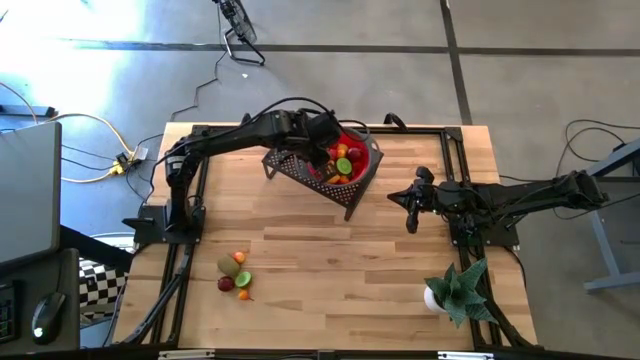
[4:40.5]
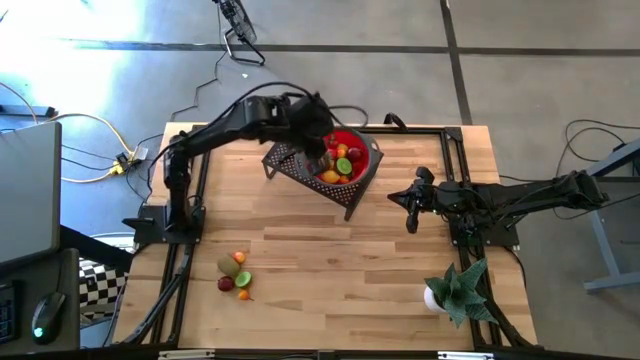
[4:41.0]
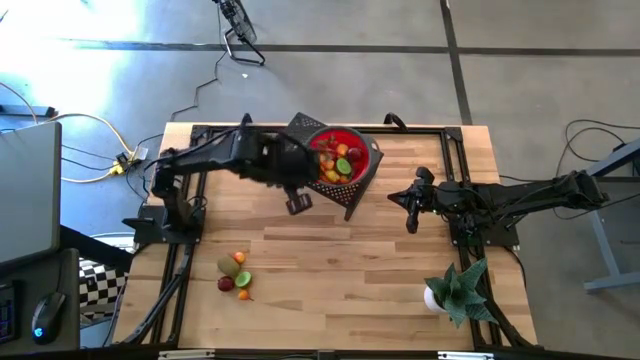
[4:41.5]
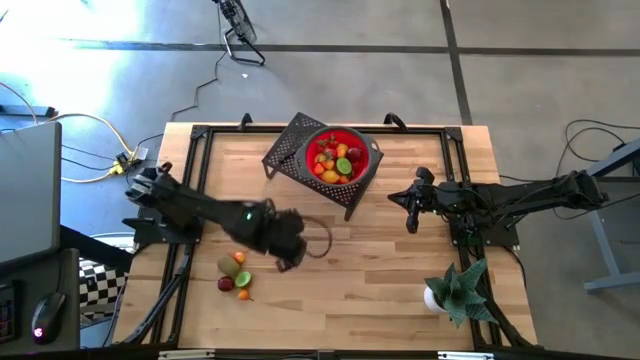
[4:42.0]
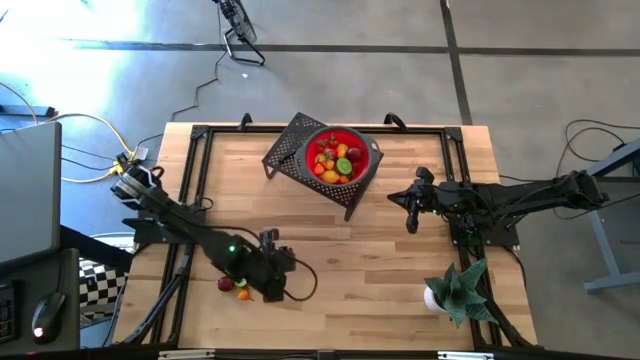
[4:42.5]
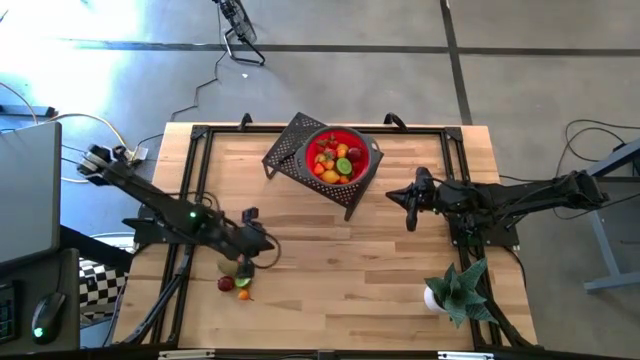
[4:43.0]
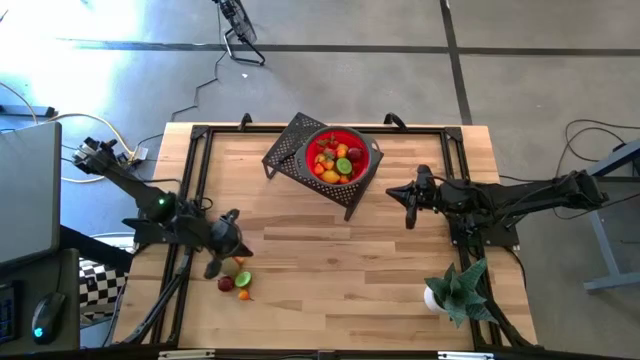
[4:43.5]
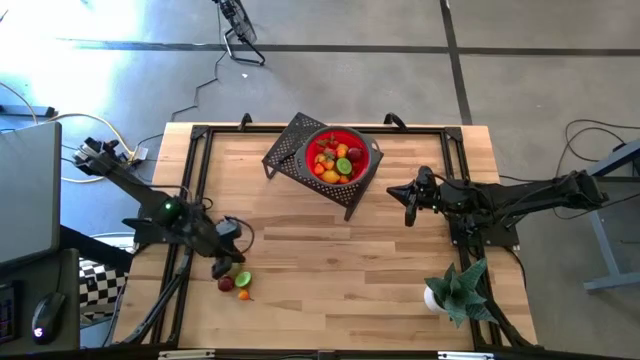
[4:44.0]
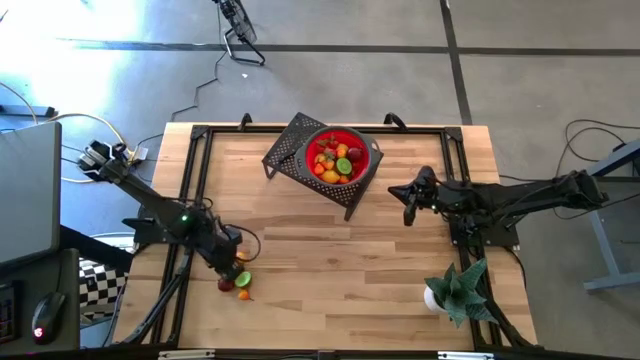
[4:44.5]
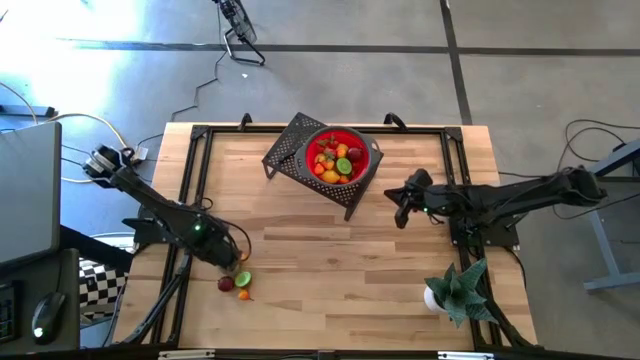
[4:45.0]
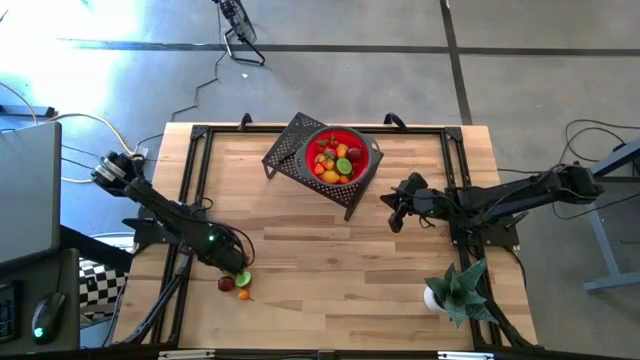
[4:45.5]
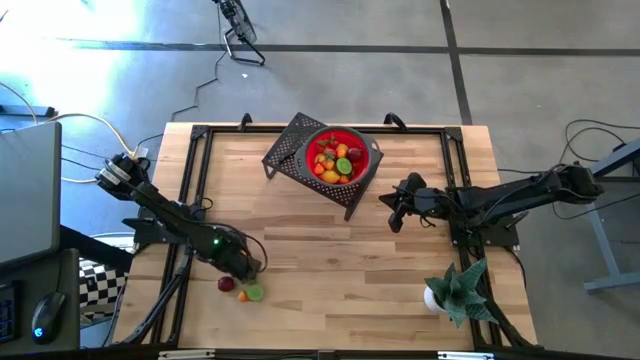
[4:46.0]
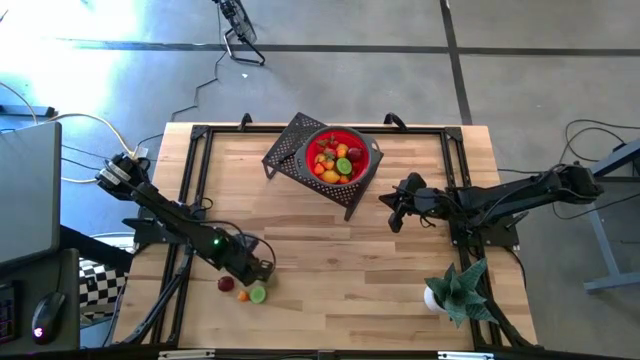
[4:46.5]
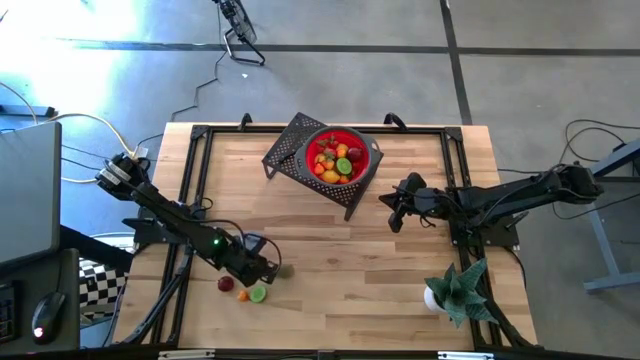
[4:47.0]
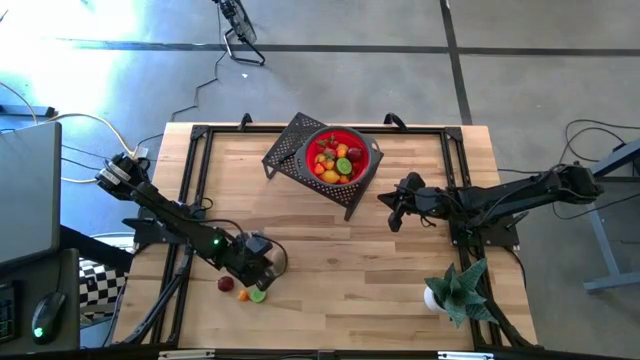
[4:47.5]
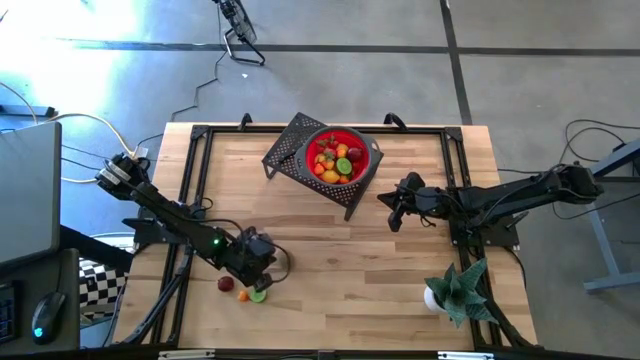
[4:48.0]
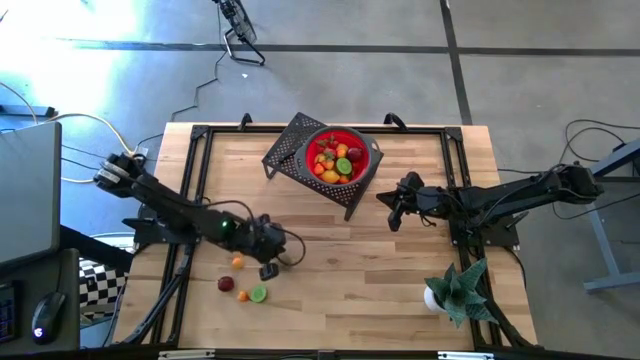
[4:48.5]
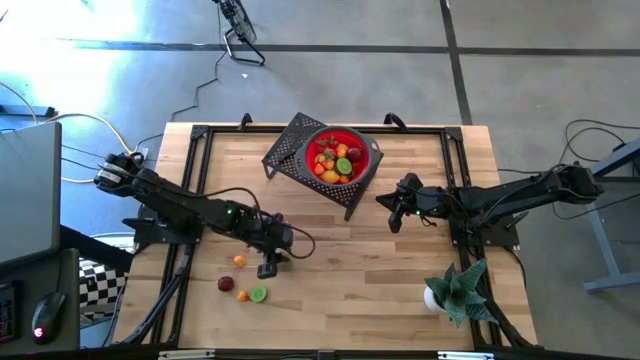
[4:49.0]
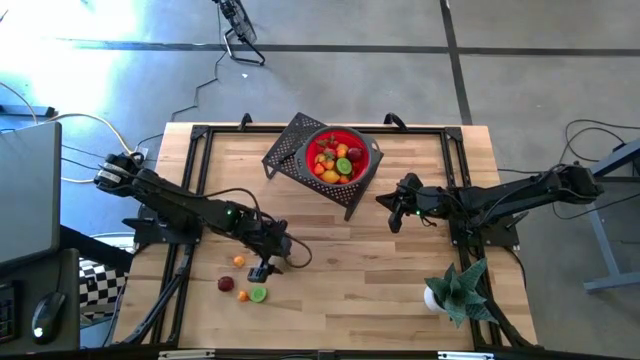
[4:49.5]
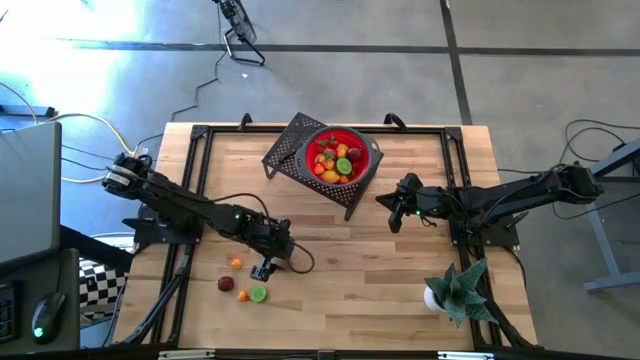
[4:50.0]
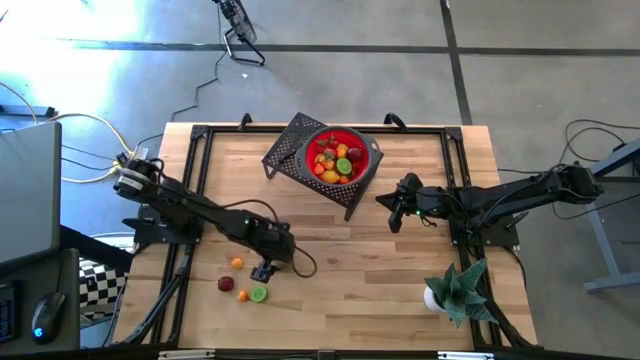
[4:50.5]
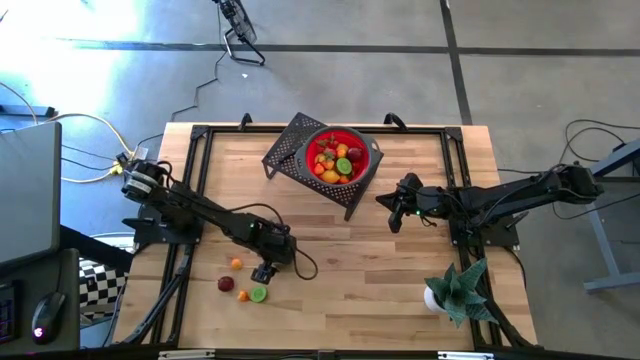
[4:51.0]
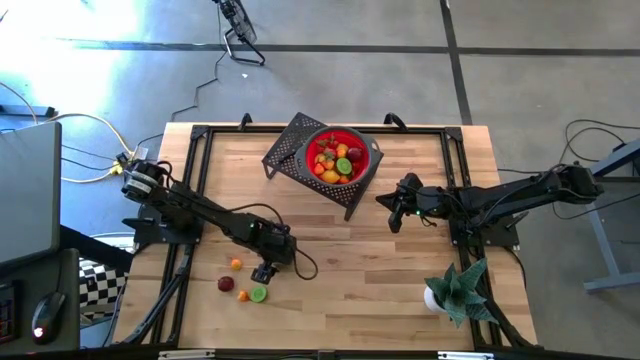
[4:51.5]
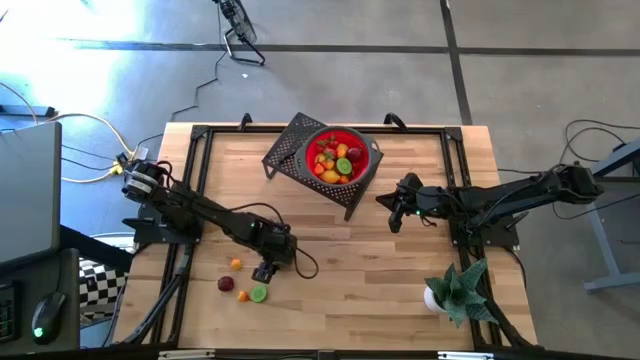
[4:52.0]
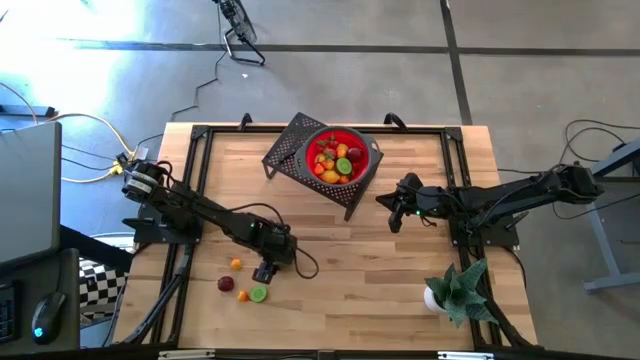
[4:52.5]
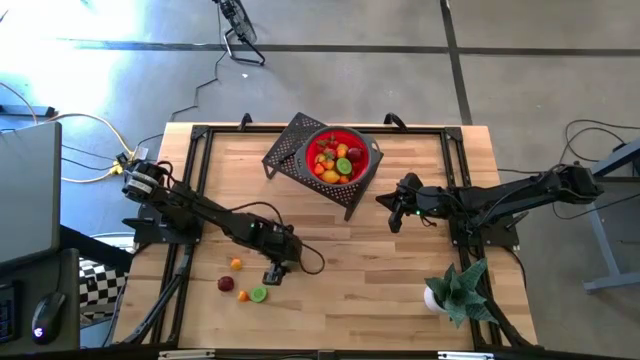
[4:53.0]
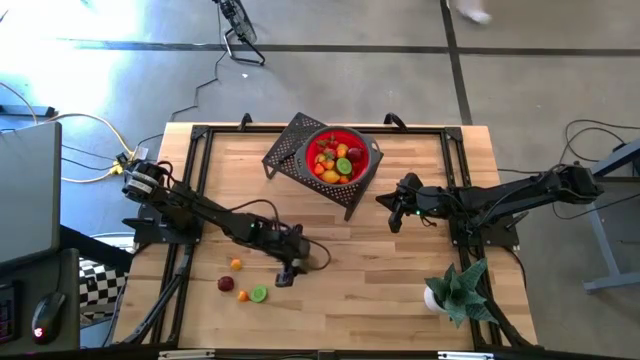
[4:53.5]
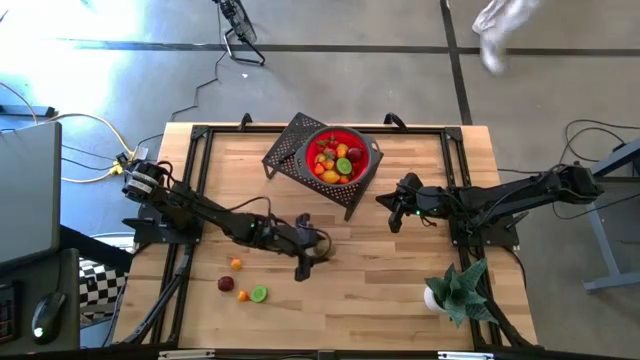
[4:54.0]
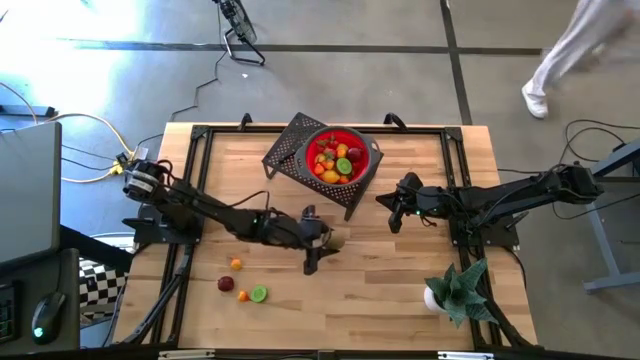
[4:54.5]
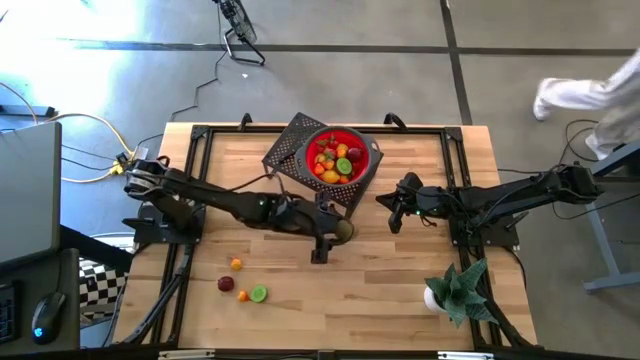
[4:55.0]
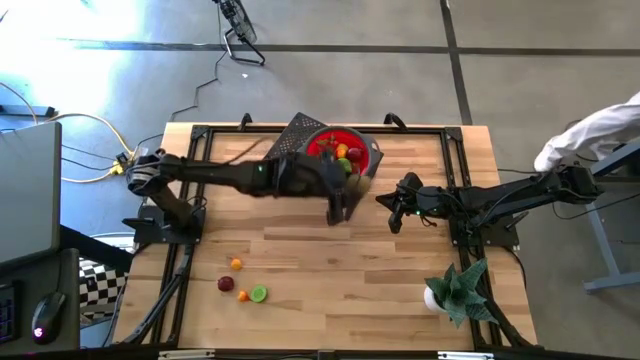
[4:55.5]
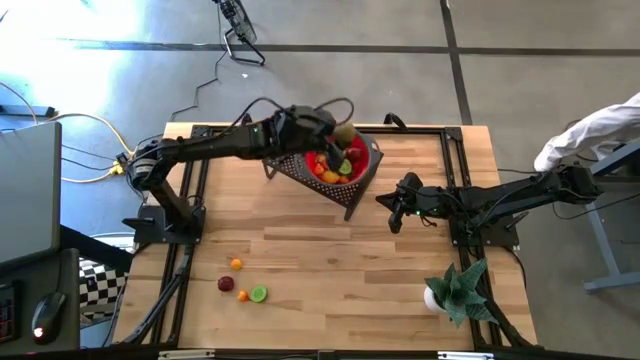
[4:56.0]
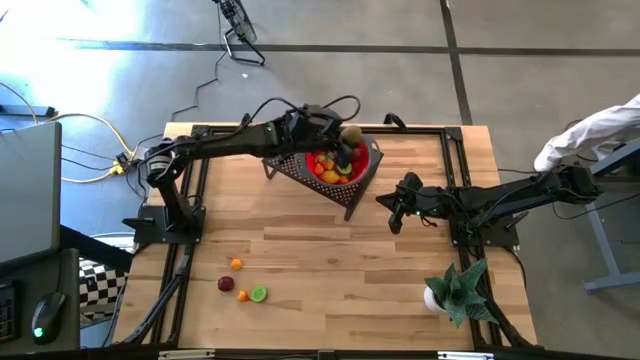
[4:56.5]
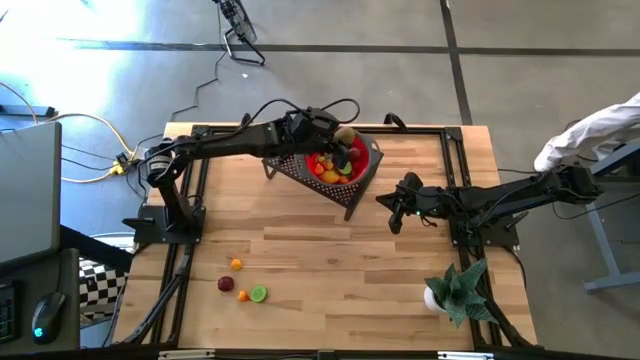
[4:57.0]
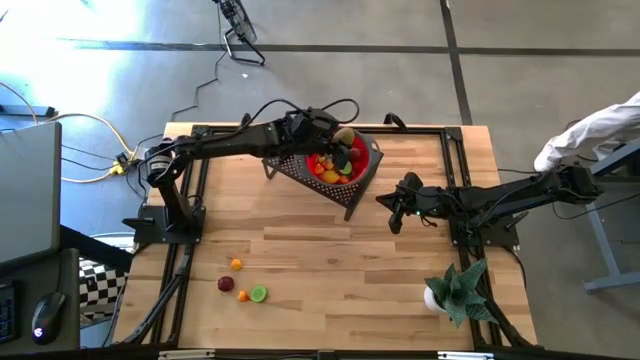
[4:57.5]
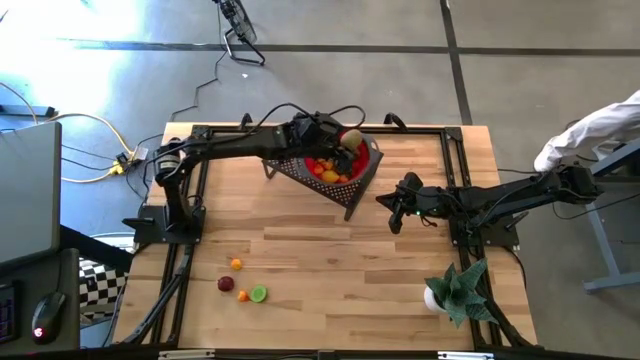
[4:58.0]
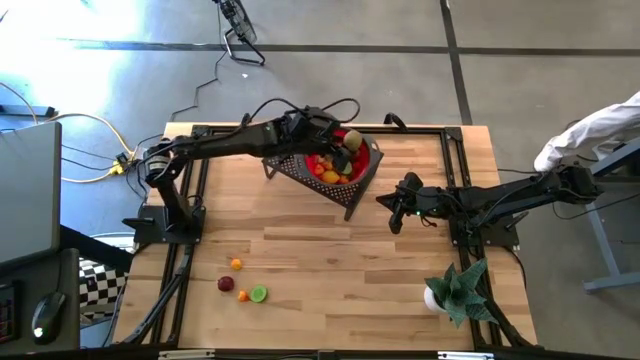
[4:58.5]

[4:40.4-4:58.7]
Task: Pick & Place Fruit
Put the kiwi into the strainer bowl on the shelf

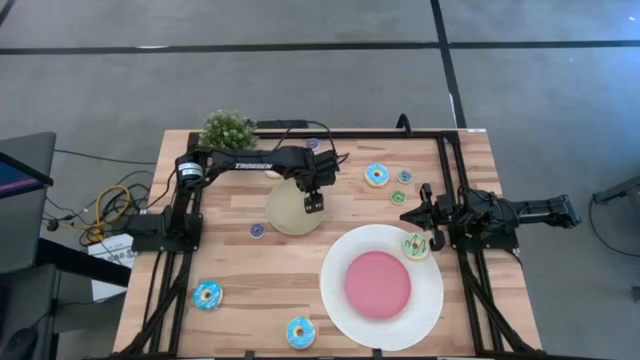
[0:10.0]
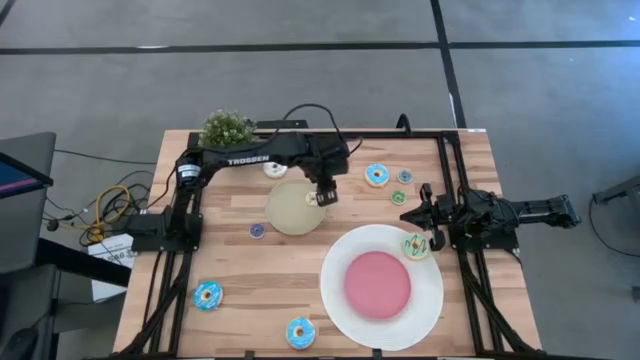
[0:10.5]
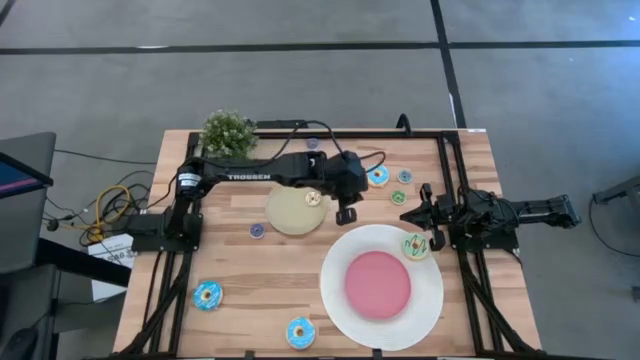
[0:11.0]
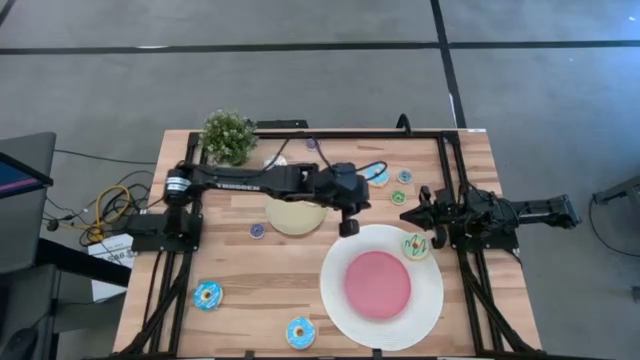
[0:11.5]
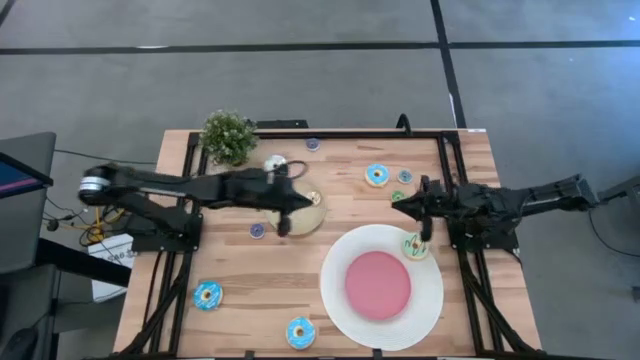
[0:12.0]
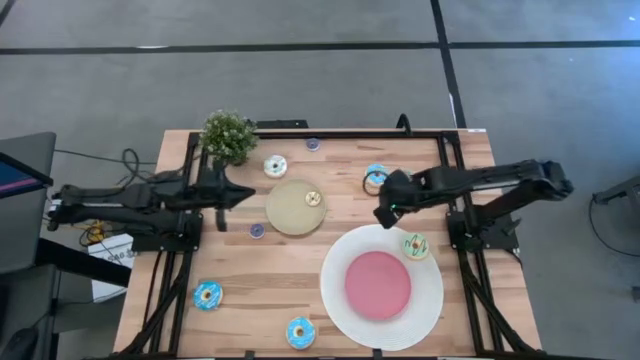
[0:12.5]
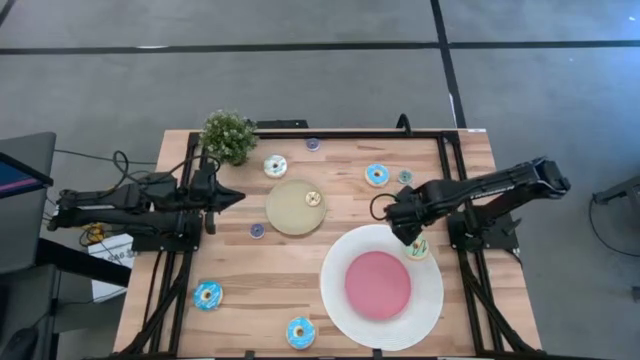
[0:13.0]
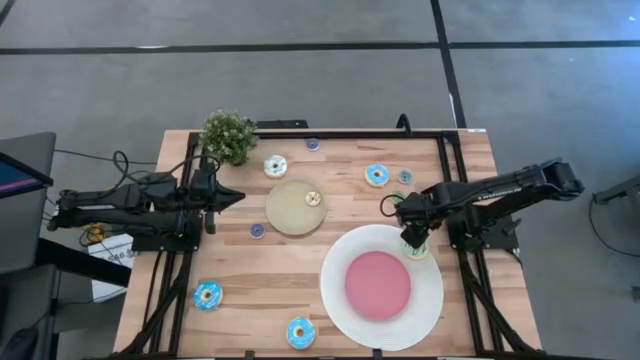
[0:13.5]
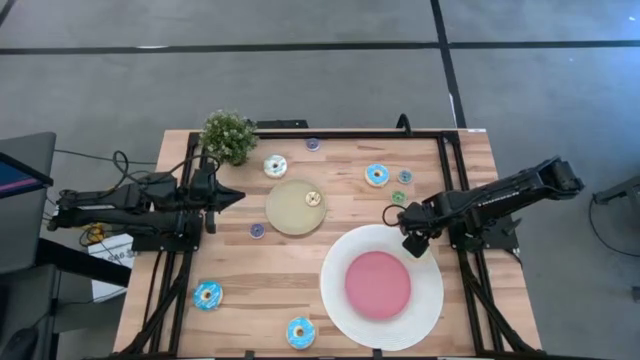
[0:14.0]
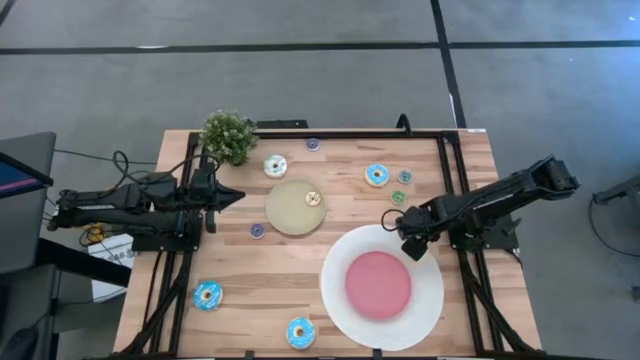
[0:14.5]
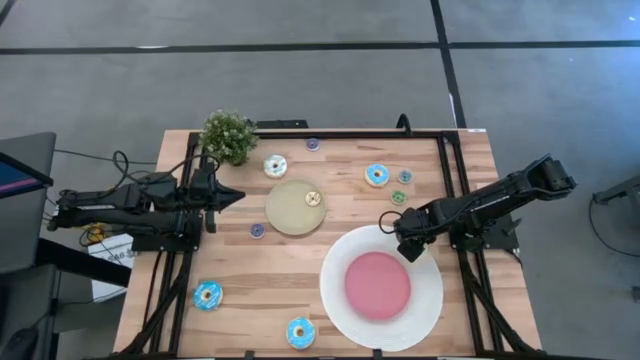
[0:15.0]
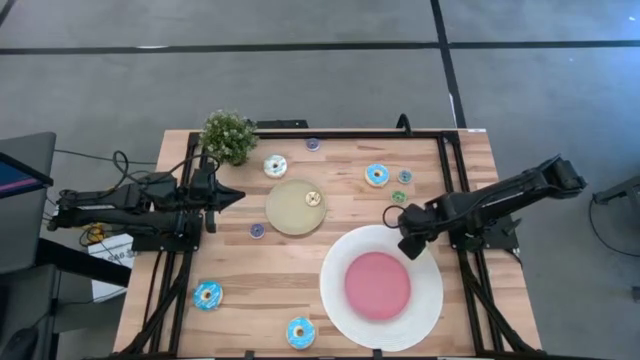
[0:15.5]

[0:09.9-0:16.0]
Task: Pick & Place donuts
Put the large light blue donut on the pink plate
